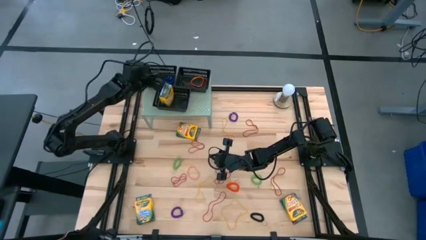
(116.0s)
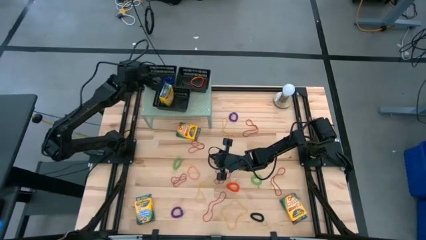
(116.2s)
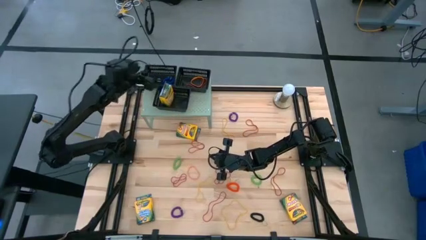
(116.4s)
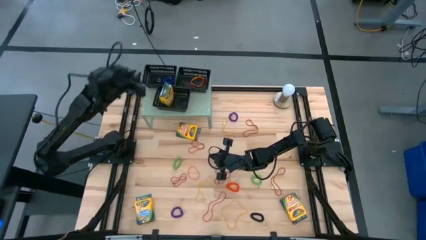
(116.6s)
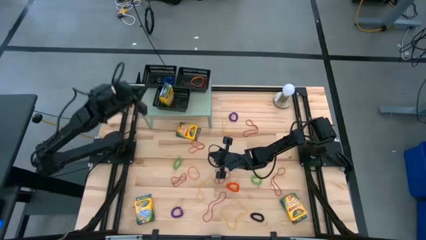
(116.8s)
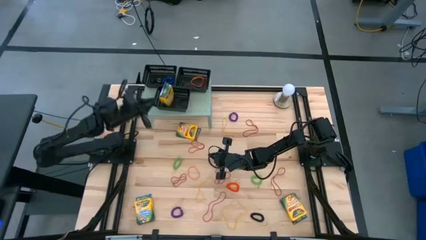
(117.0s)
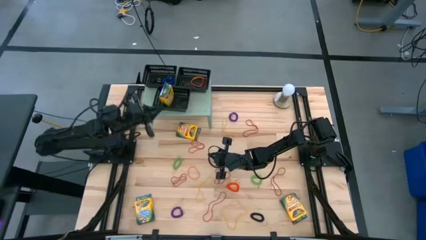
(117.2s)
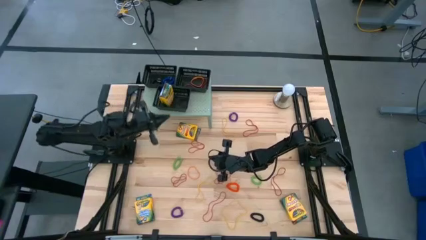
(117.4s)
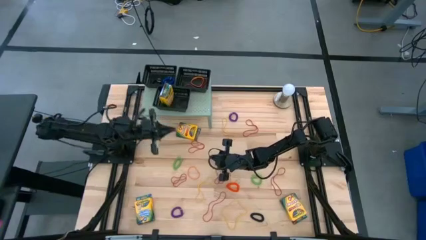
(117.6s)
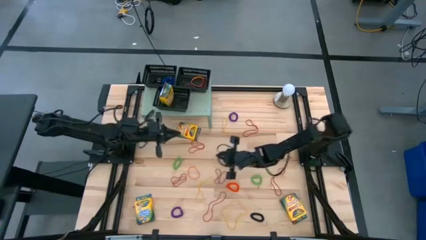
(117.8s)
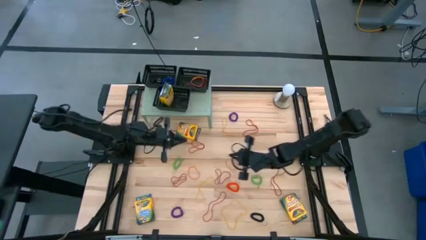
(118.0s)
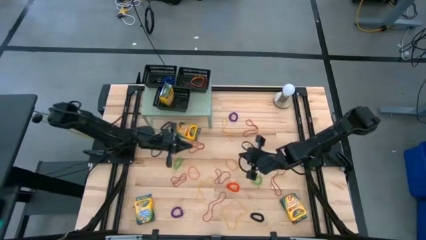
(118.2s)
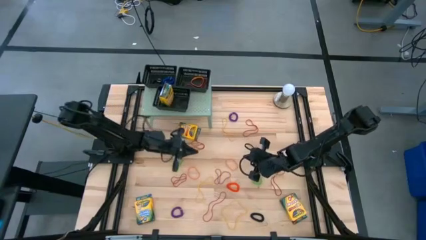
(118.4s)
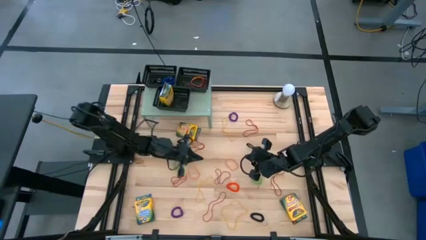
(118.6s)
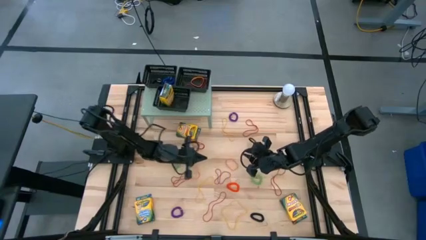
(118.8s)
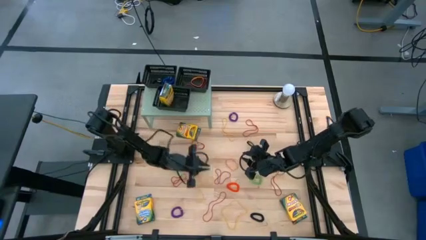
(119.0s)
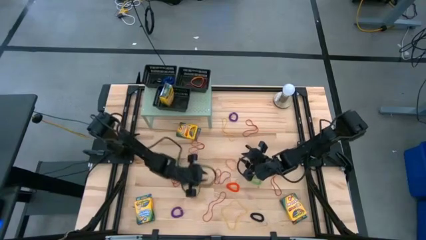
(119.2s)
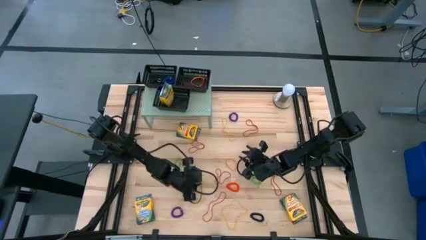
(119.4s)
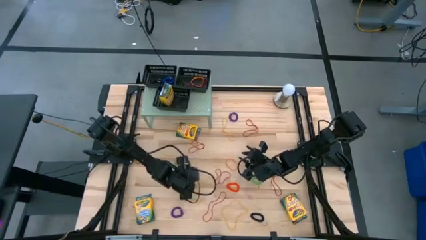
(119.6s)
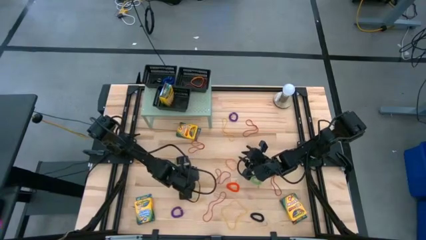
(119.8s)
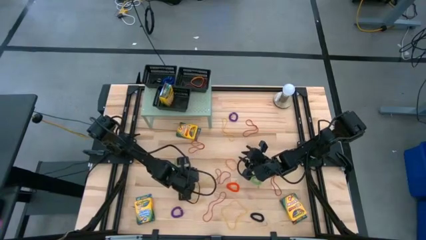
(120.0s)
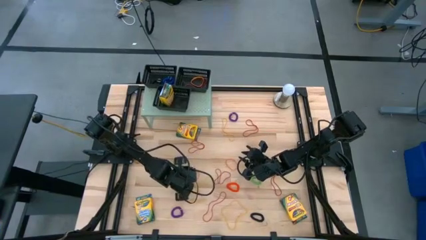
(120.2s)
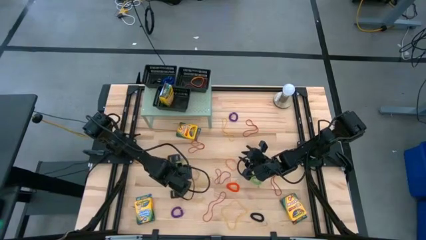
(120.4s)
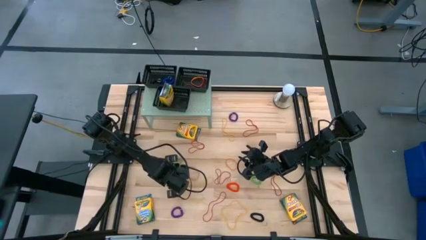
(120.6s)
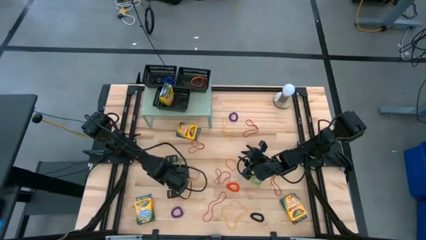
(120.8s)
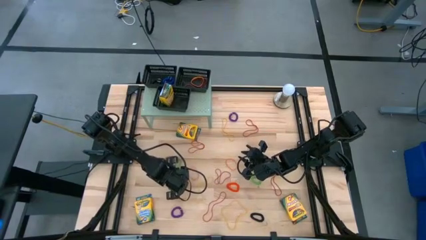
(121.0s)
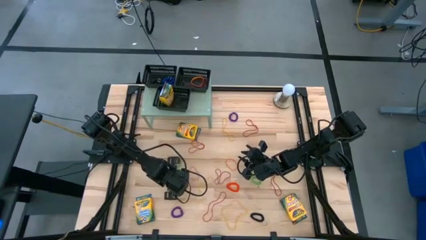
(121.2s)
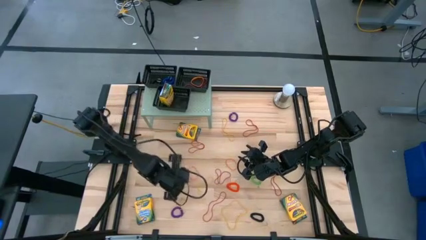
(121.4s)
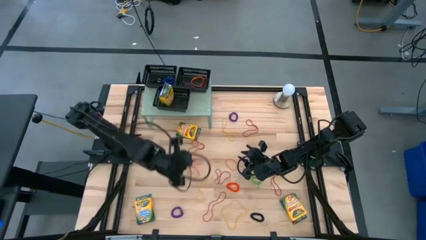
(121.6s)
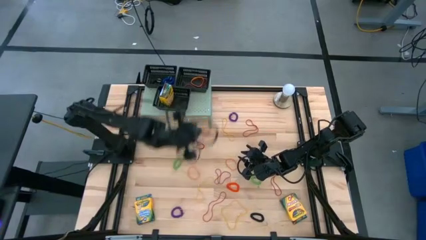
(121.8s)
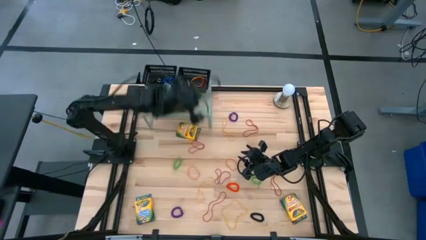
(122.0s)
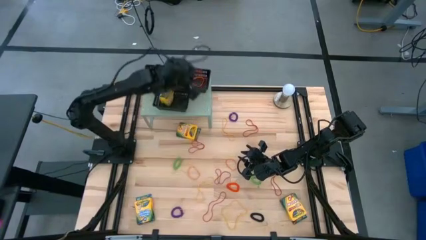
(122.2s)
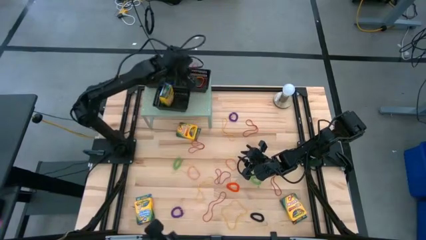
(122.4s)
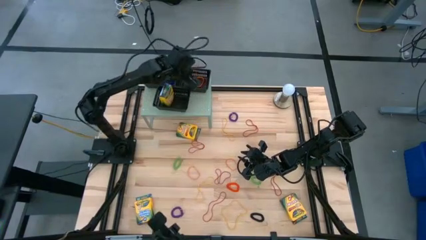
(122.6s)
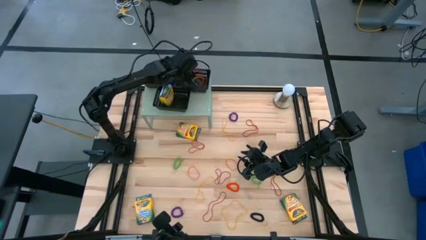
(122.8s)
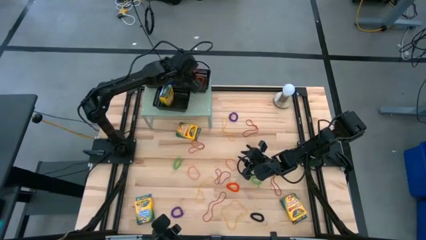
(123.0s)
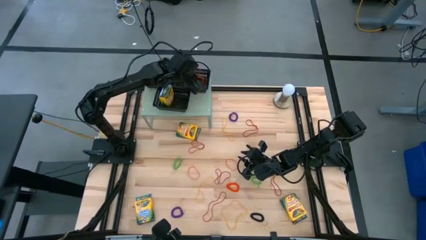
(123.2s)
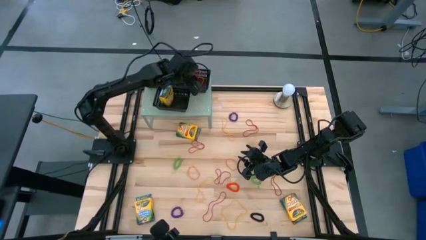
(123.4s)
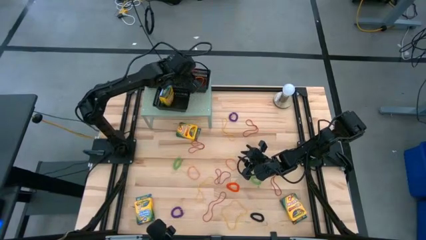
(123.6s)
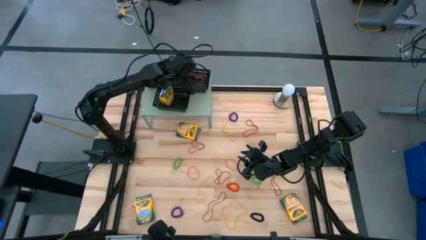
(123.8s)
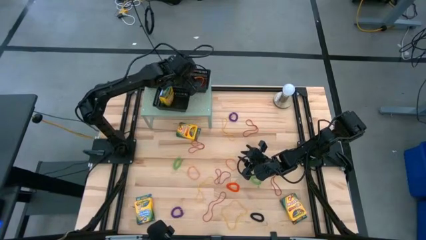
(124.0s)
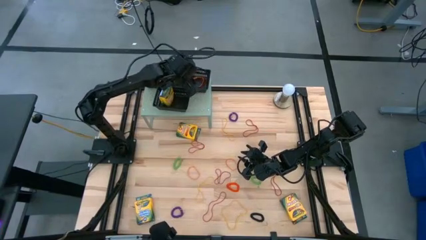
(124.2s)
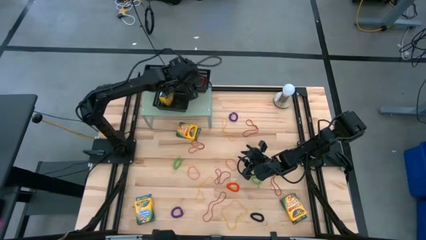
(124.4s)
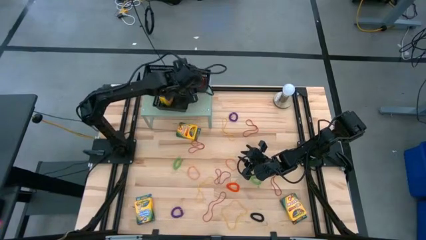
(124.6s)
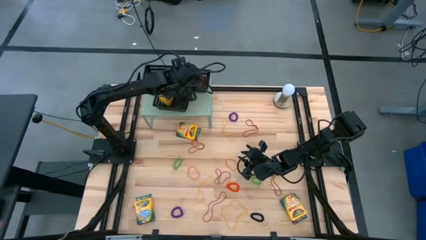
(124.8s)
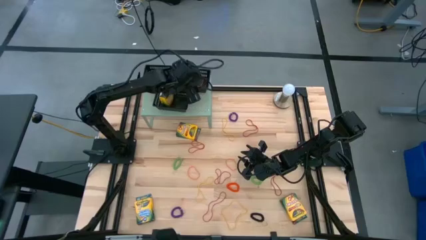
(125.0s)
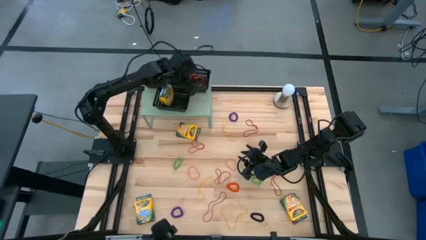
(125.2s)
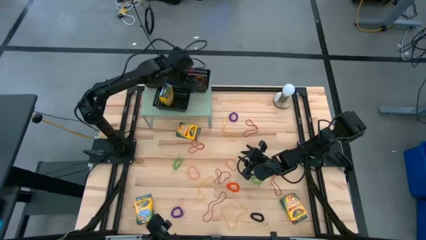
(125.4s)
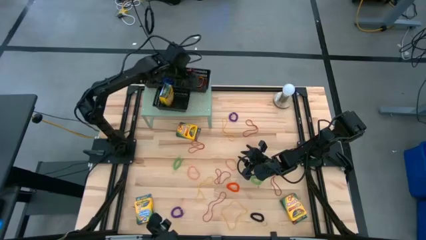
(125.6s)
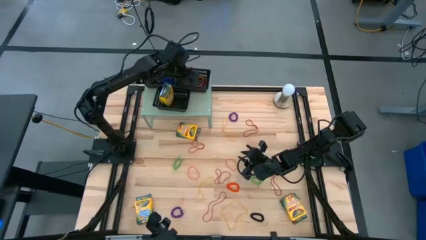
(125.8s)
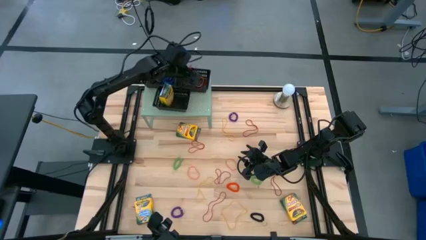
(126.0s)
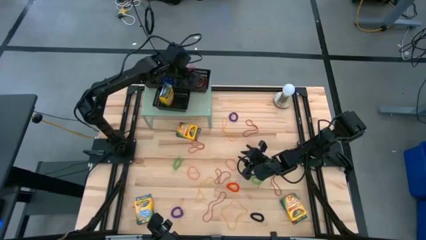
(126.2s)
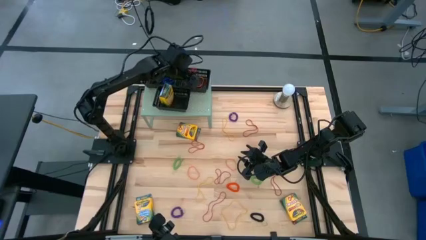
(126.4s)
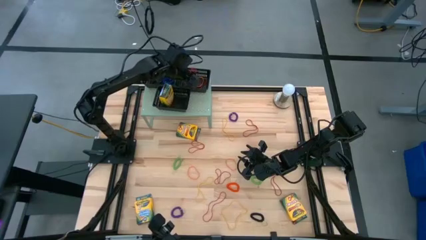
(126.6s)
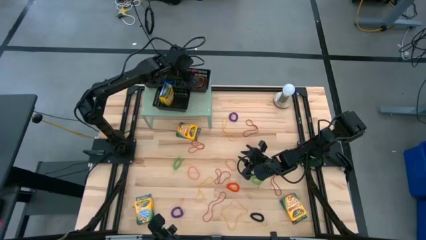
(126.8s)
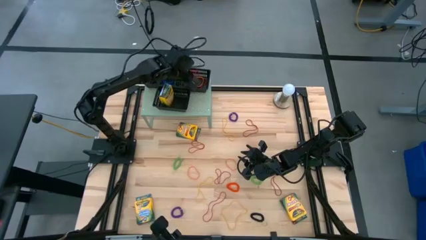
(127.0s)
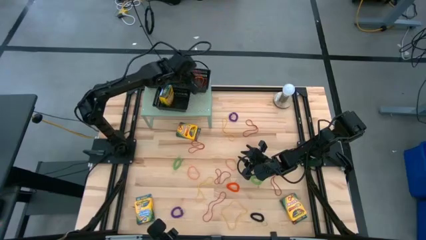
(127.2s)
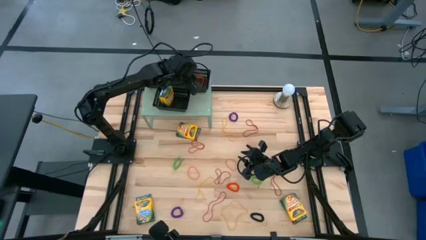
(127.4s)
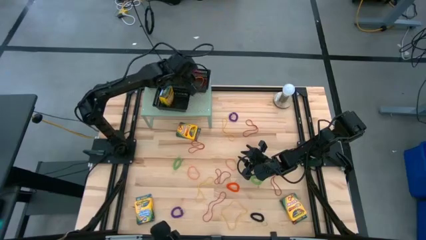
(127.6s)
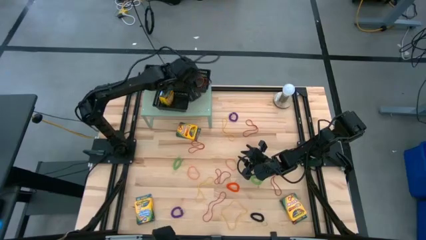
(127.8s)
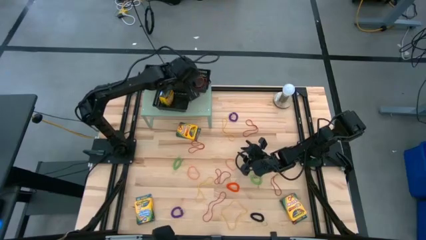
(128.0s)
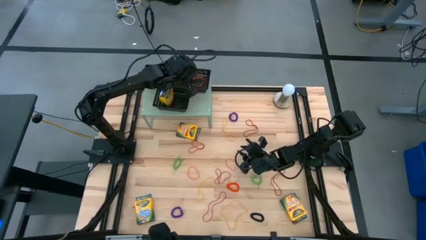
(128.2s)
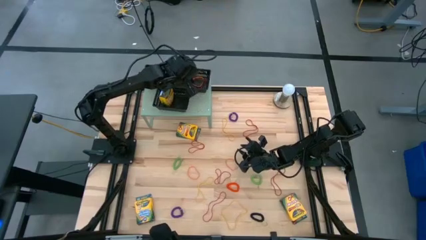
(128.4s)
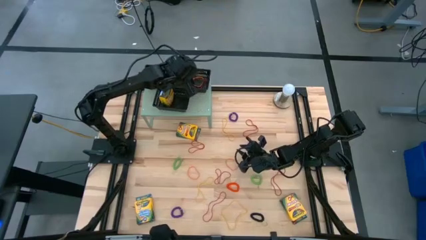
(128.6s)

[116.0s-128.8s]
Task: Pick & Place Office Desk Supplies
Put the red rubber band into the top right black bin

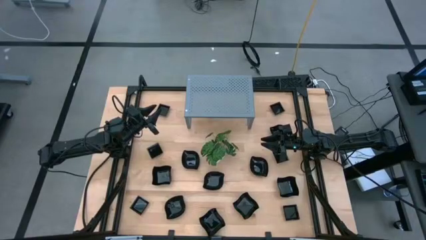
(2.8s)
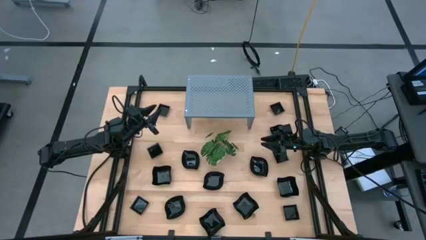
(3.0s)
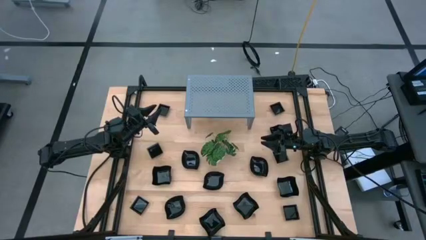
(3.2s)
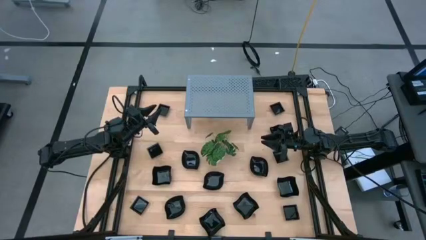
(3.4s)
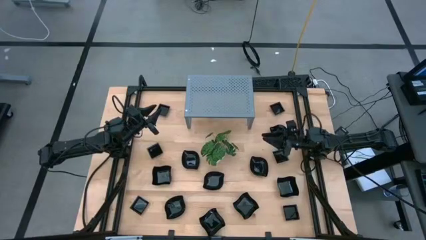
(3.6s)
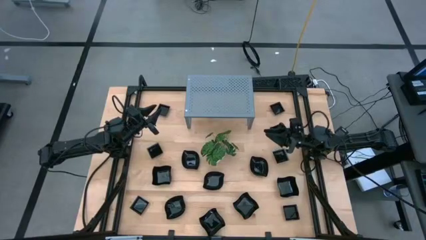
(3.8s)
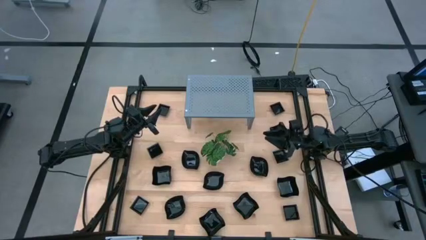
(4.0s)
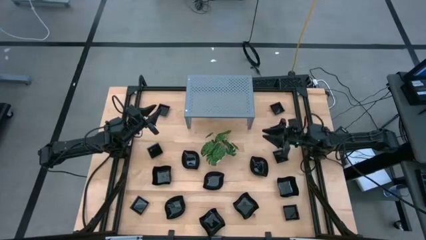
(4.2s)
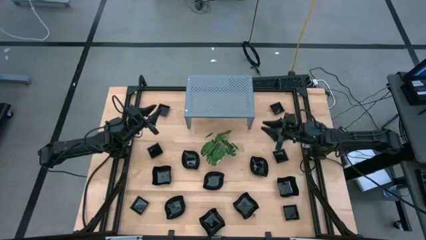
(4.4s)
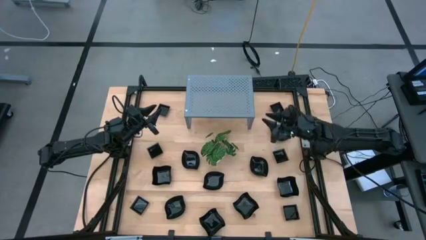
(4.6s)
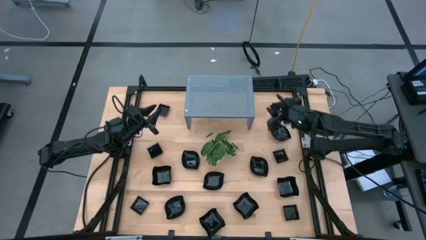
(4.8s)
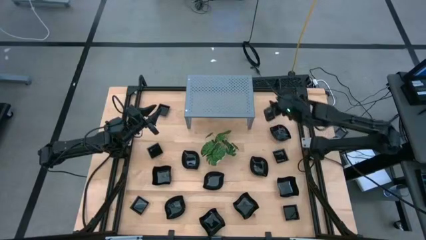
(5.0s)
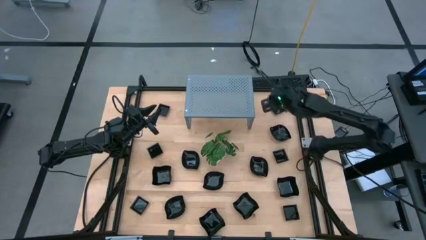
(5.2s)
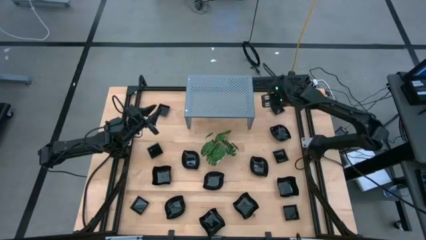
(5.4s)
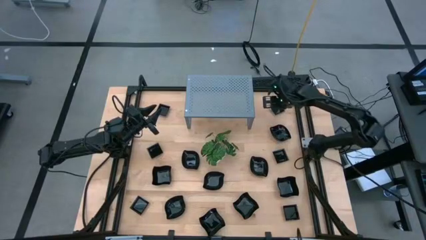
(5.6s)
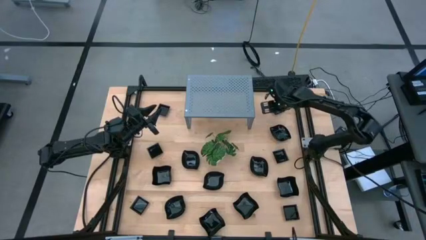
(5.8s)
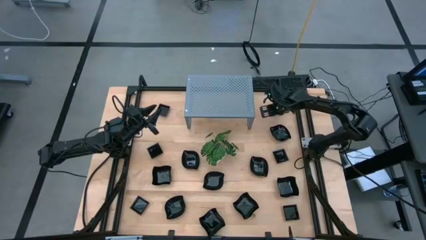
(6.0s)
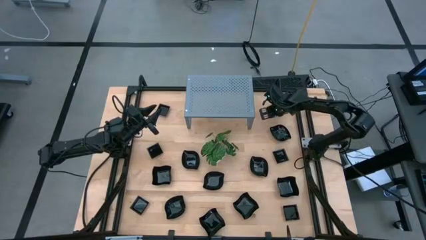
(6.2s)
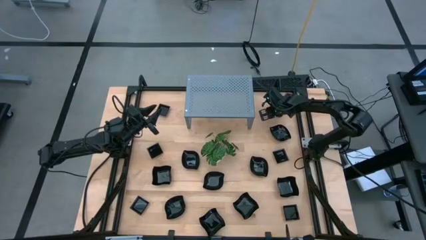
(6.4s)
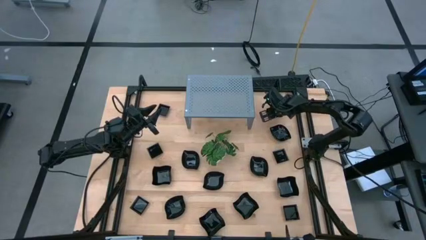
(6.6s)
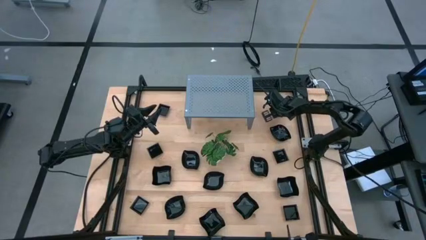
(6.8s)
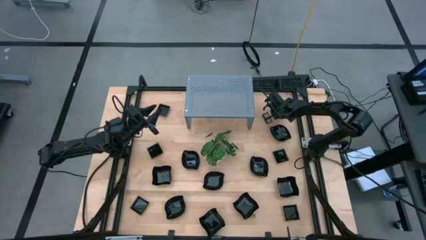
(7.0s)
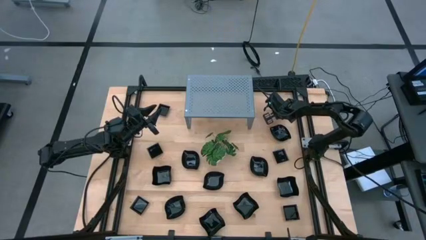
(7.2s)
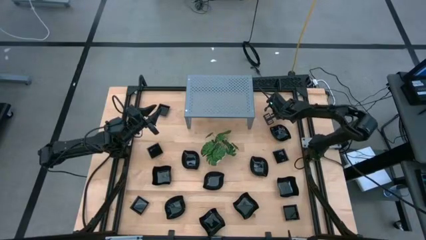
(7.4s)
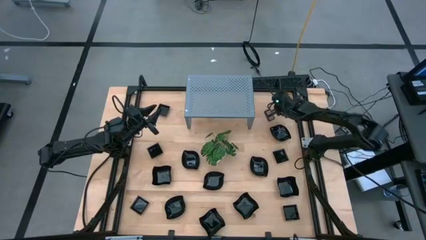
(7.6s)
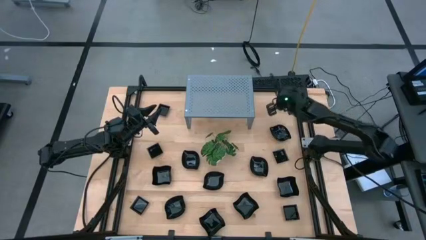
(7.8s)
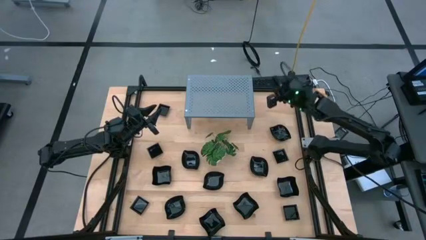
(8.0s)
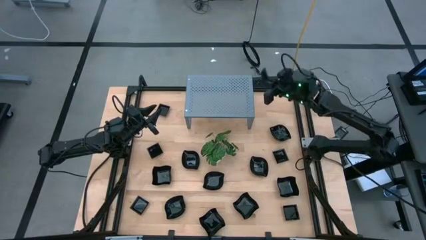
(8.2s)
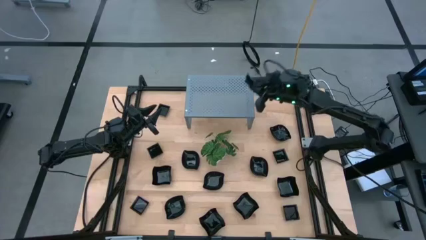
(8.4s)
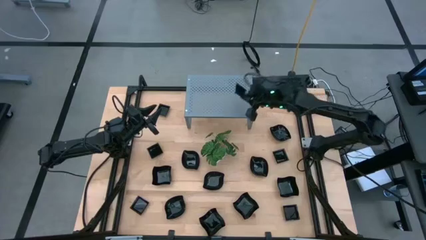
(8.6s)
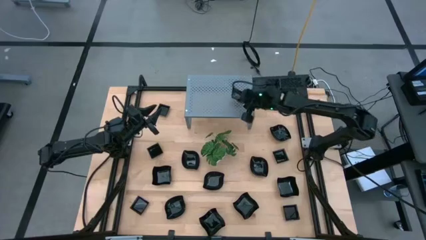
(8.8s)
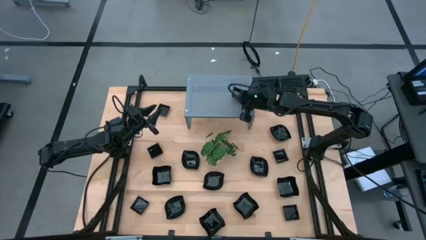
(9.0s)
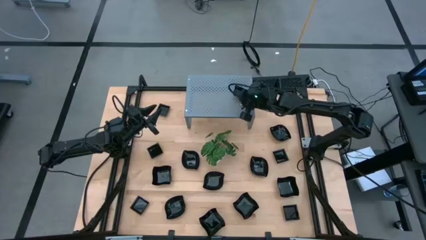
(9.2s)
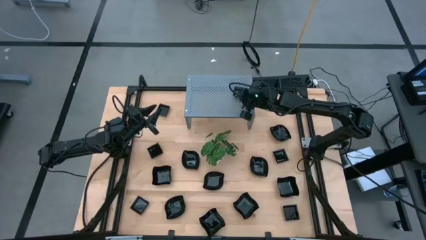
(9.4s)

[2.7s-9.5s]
Task: Pick & Place Mini shaped plates
Put the square plate on the shelf
